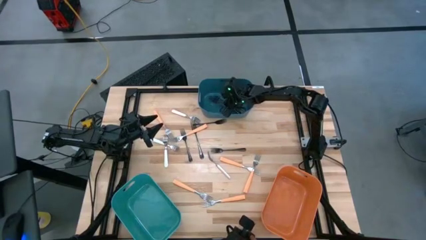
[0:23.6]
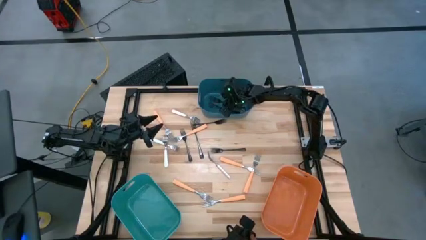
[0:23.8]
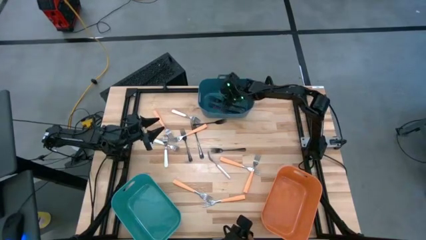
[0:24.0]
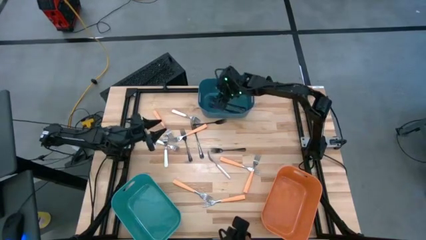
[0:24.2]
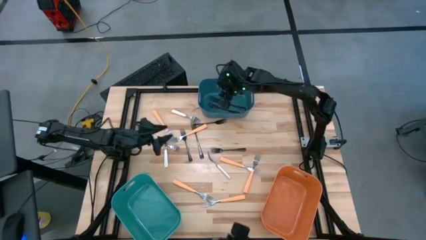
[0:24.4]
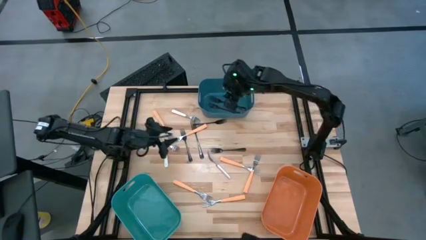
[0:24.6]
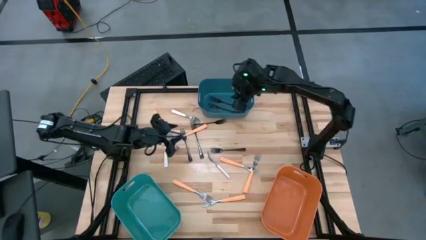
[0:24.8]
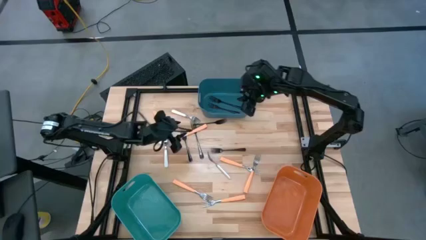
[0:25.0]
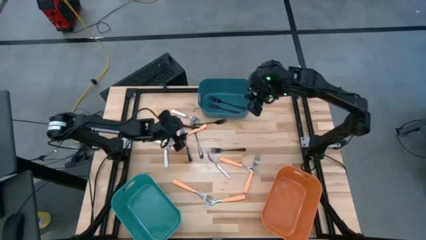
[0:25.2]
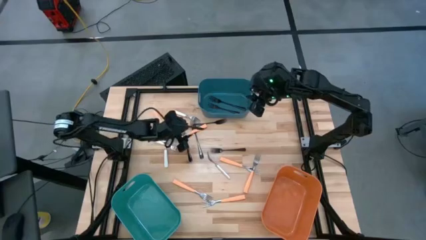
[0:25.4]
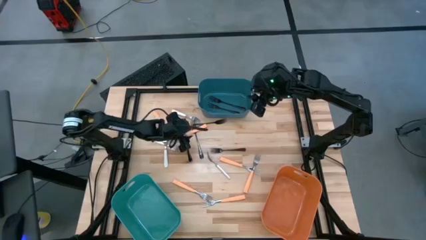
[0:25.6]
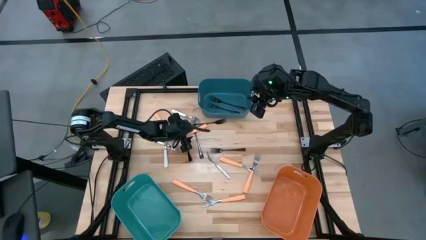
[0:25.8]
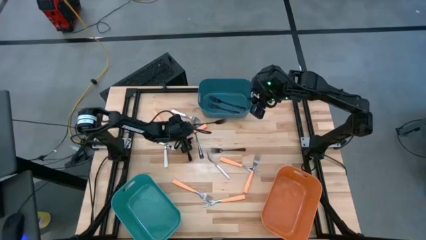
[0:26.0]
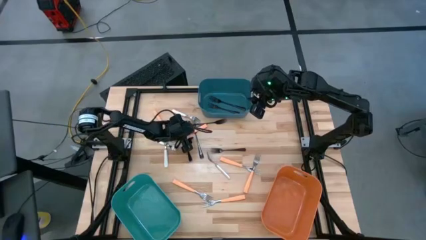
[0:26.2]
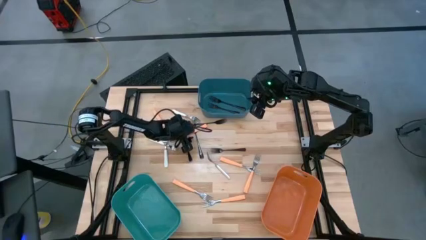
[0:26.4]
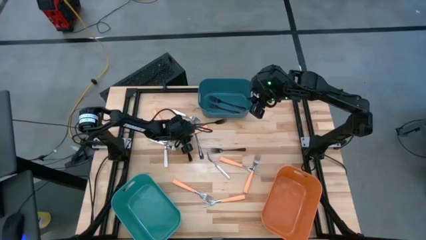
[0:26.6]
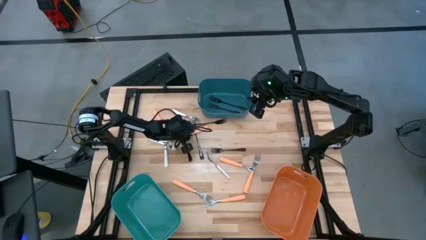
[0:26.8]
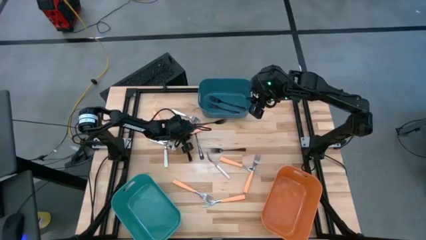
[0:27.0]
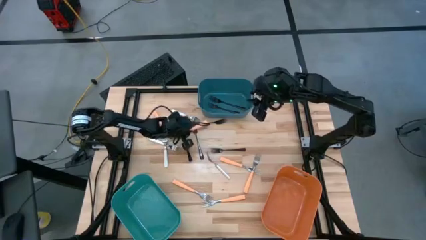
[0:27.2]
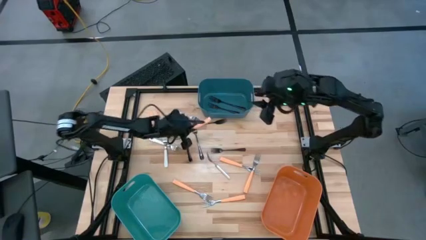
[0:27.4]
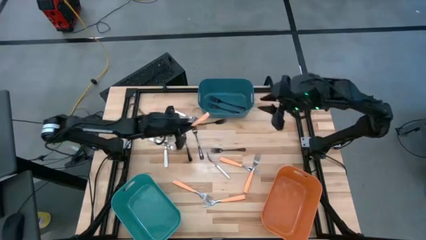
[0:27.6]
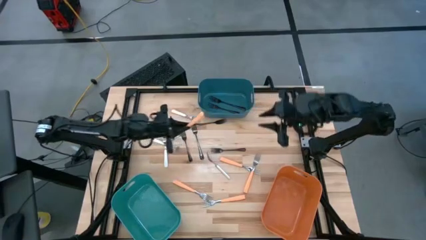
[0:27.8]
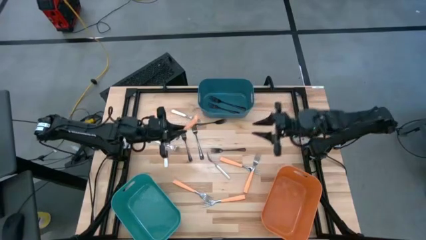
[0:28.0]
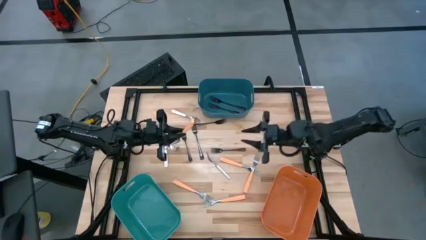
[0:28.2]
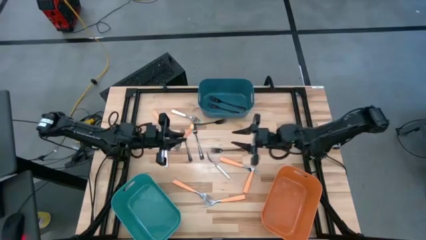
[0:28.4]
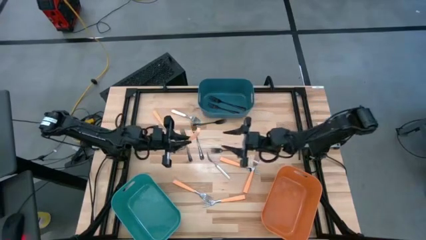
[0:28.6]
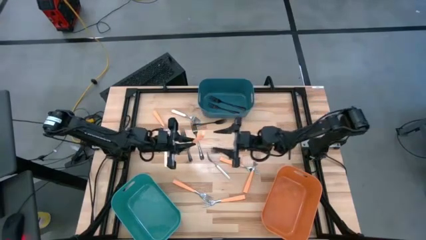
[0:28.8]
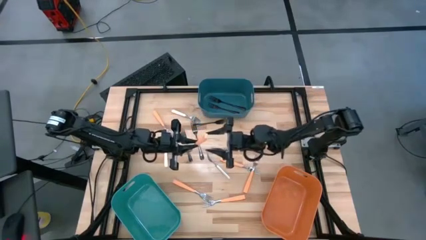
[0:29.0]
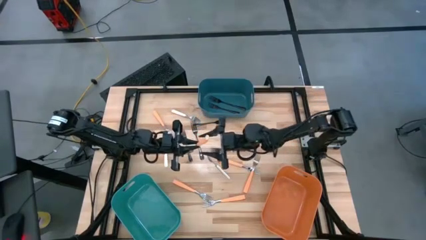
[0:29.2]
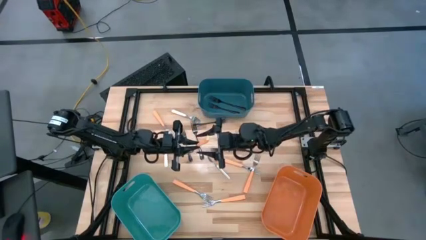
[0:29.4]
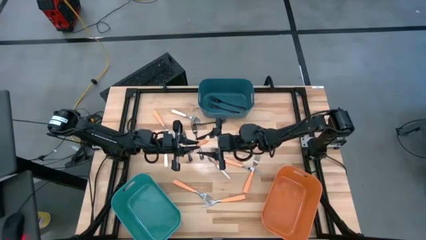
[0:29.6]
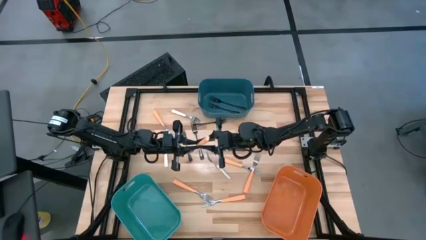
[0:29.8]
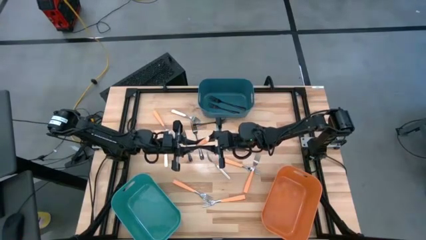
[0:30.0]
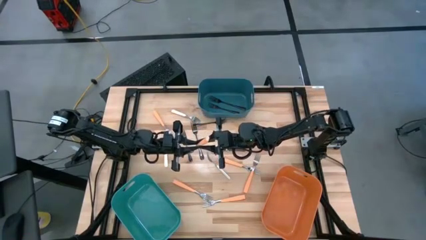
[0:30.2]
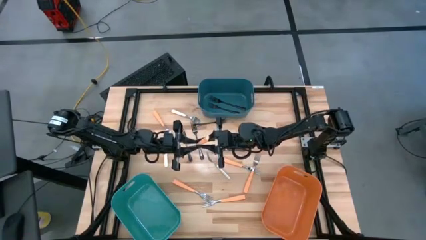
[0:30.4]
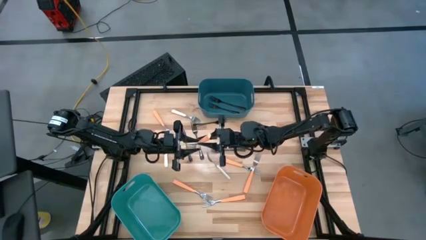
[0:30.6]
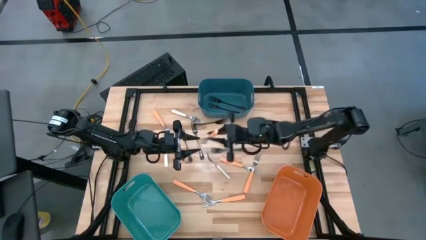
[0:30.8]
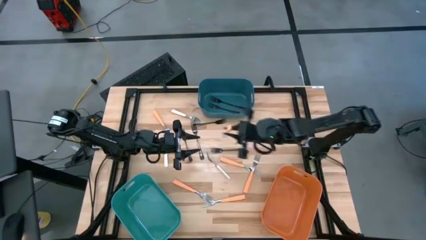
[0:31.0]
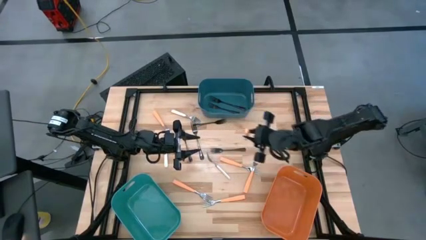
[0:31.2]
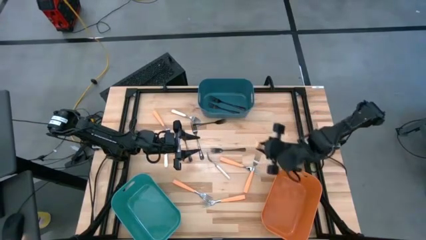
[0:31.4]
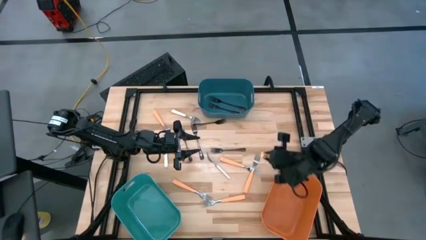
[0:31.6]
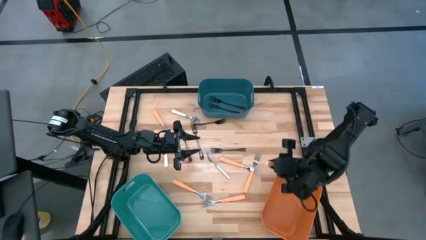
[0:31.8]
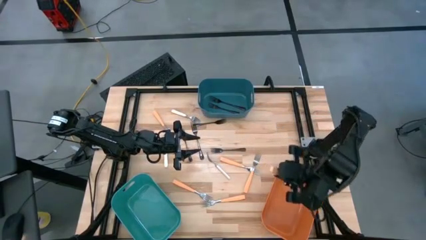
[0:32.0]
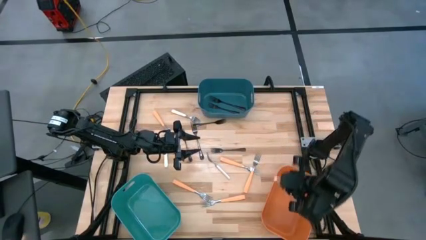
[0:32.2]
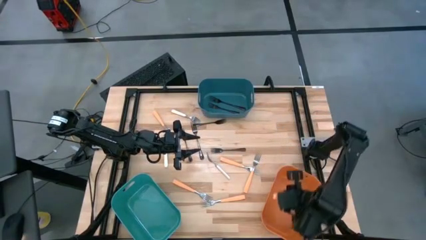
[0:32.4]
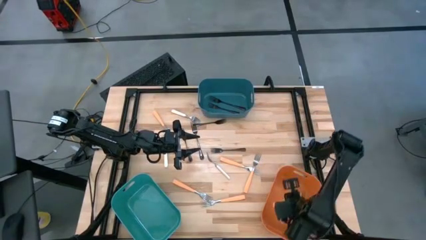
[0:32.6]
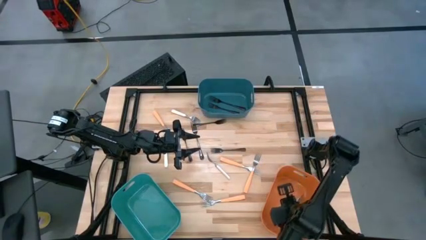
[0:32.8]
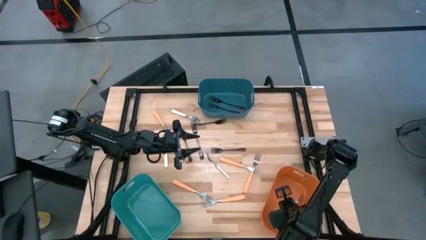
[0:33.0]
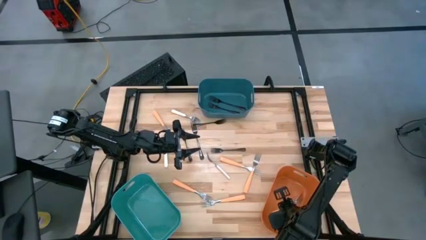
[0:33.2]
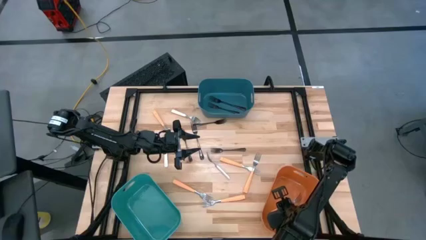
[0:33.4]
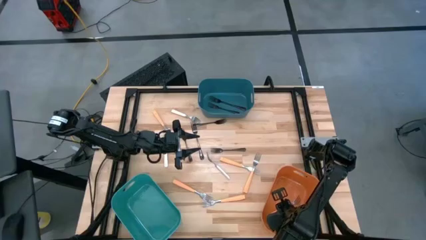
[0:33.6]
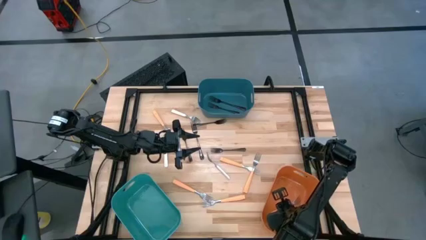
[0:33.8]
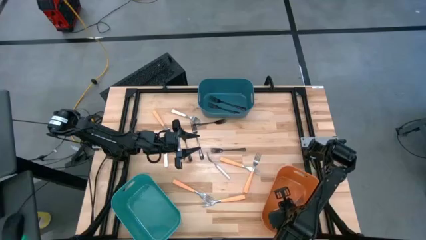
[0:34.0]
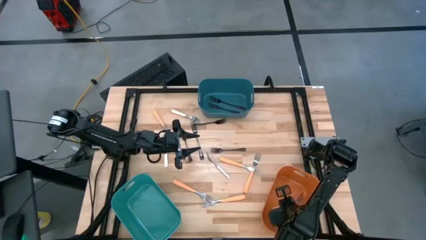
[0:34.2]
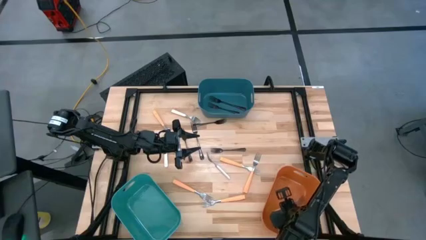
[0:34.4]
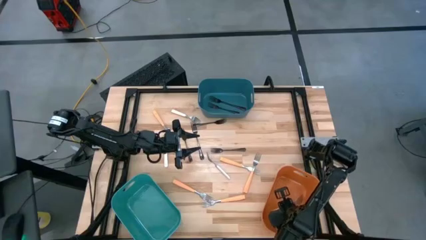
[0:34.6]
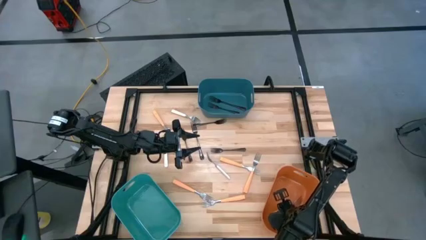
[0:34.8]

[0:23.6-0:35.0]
Task: Sort silverware by color (type)
Put the orange fork into the orange bin
